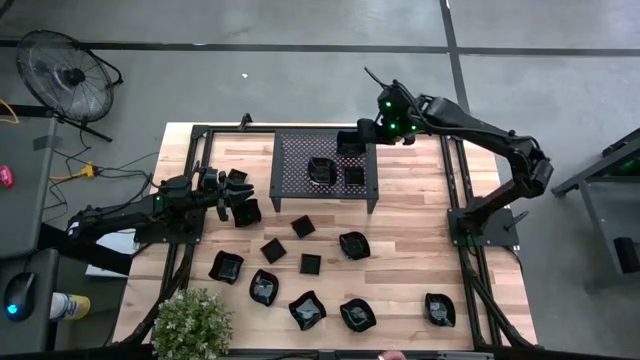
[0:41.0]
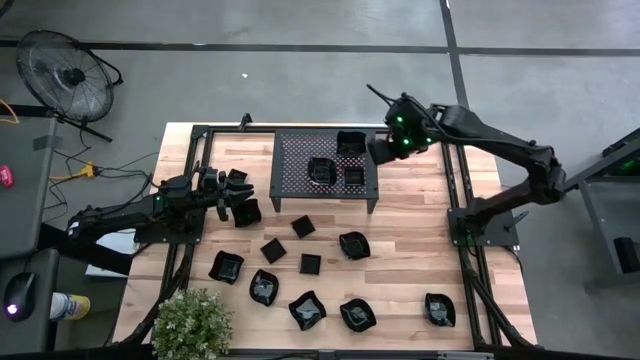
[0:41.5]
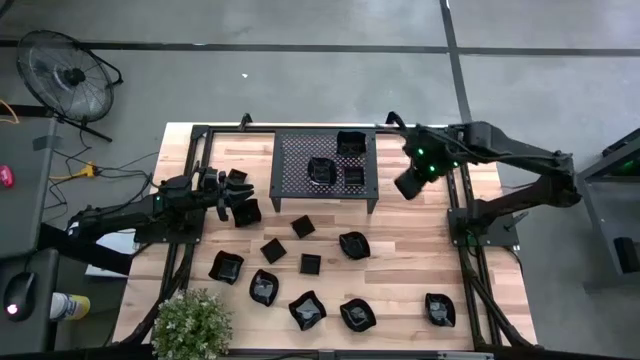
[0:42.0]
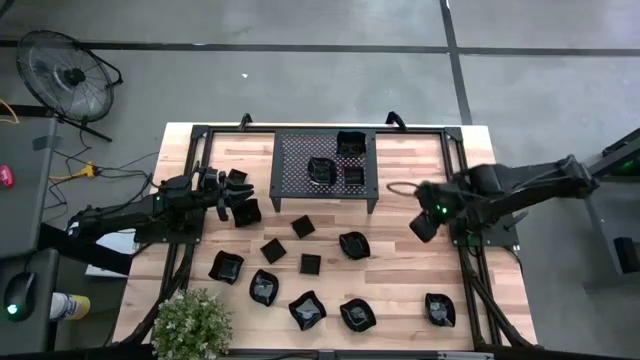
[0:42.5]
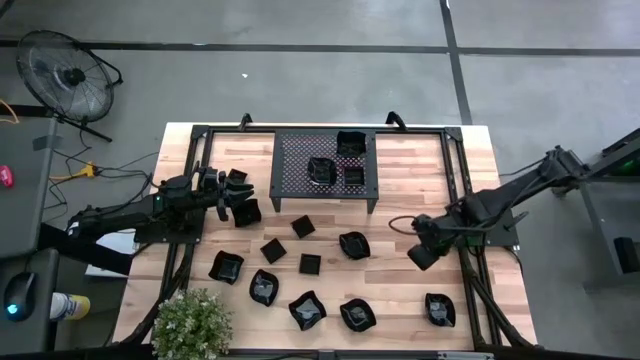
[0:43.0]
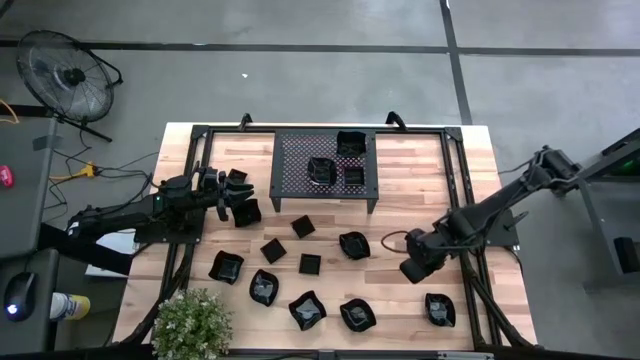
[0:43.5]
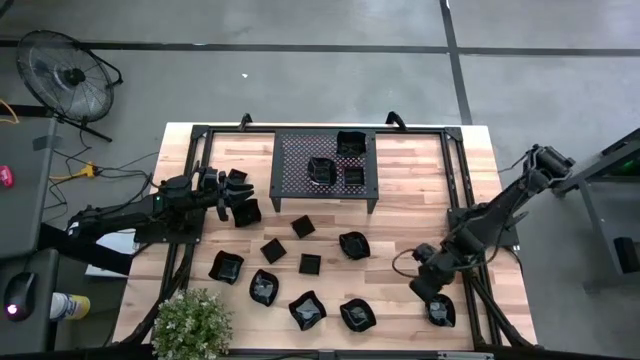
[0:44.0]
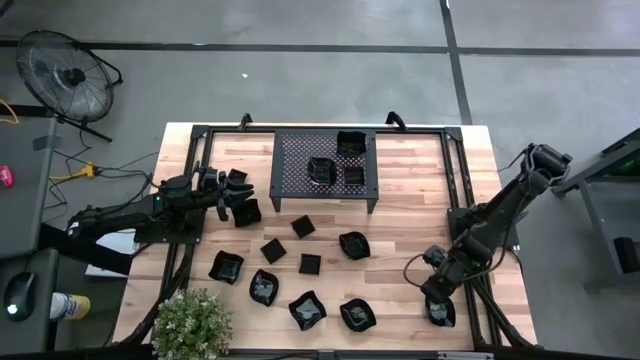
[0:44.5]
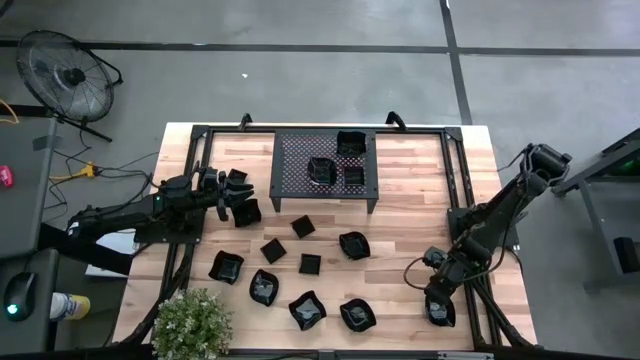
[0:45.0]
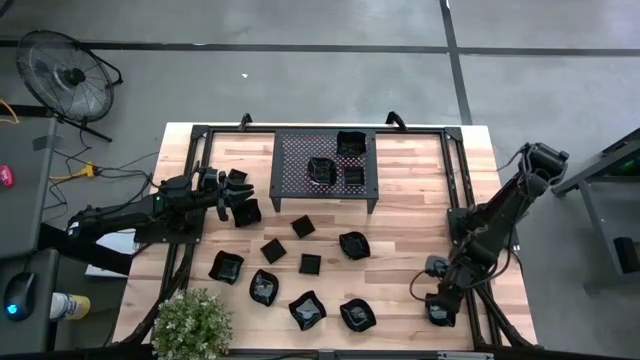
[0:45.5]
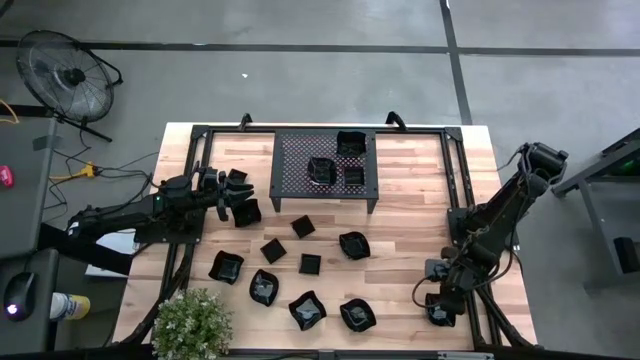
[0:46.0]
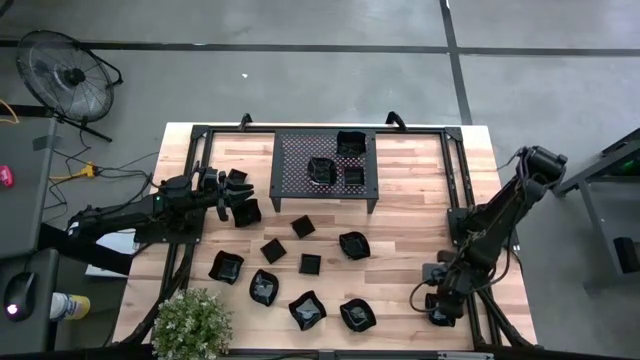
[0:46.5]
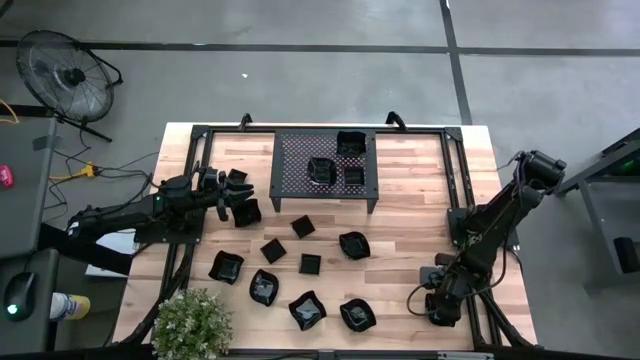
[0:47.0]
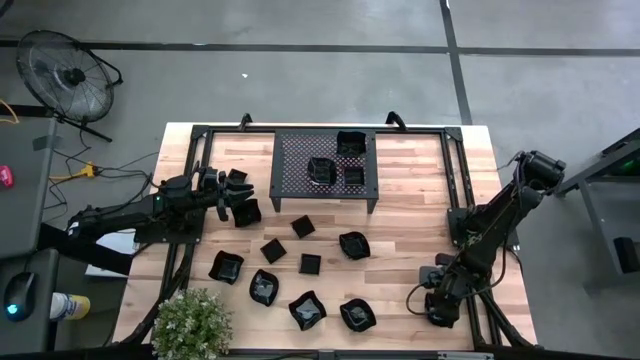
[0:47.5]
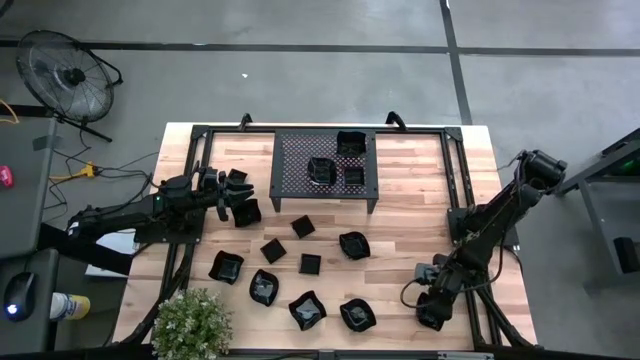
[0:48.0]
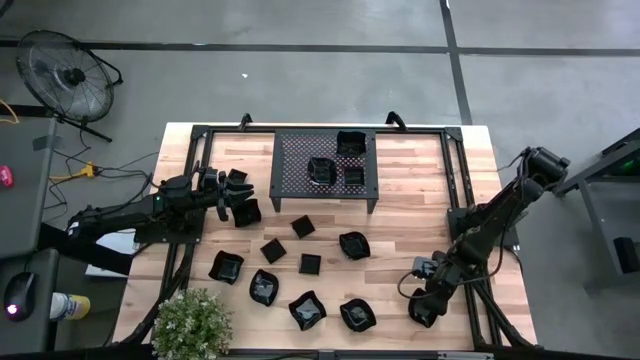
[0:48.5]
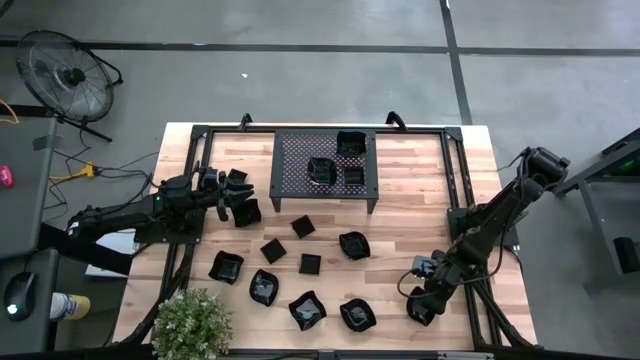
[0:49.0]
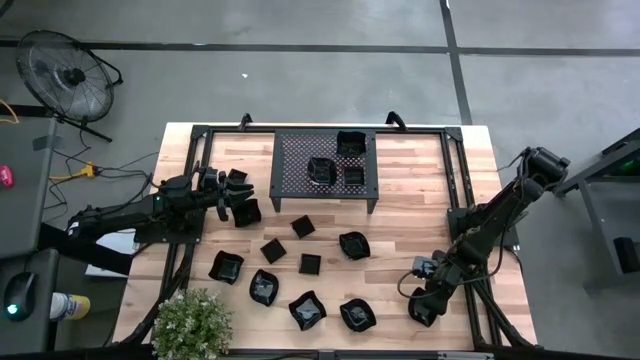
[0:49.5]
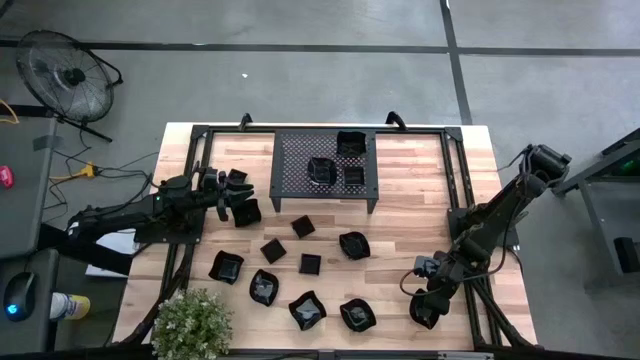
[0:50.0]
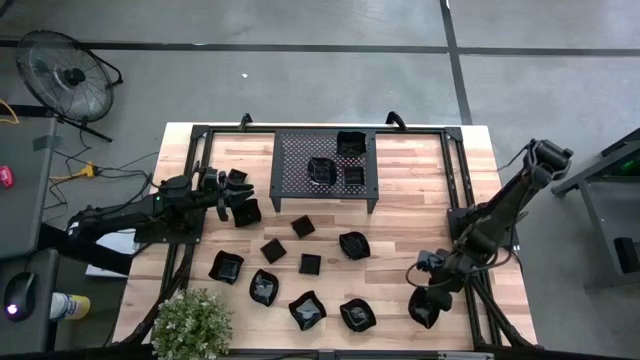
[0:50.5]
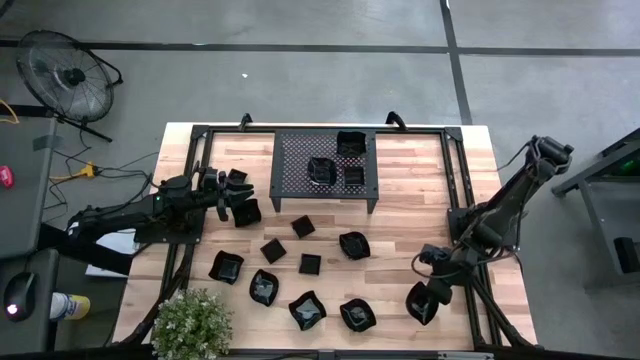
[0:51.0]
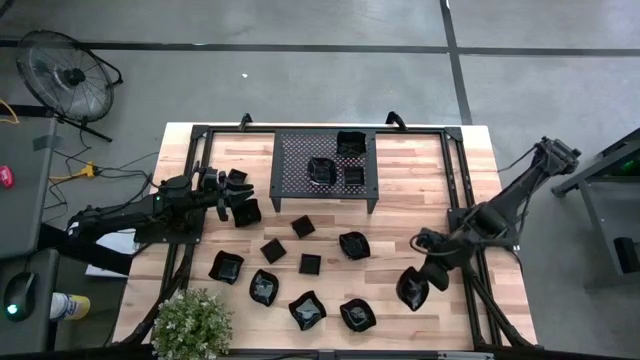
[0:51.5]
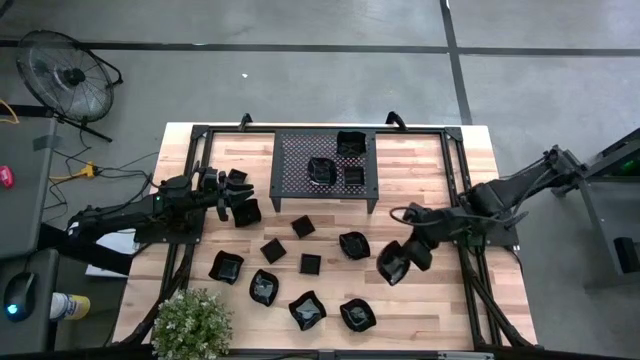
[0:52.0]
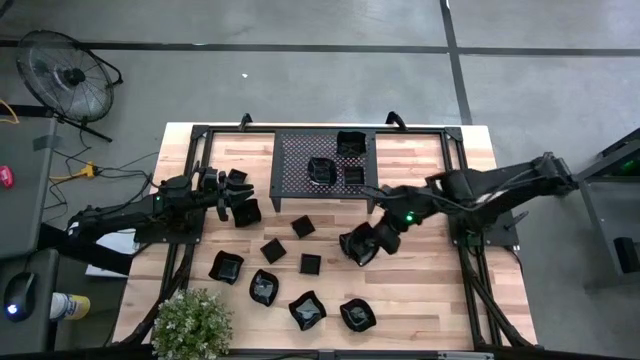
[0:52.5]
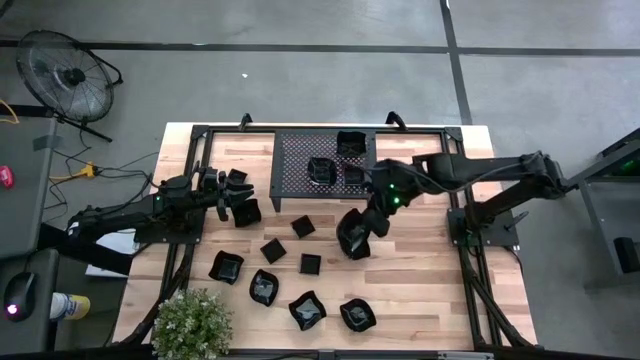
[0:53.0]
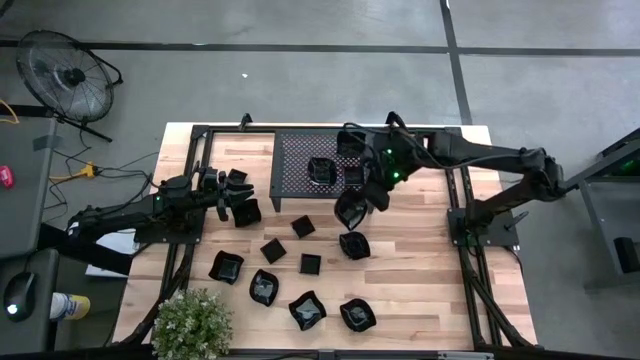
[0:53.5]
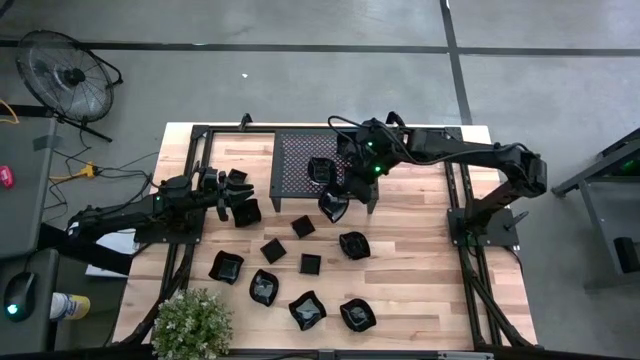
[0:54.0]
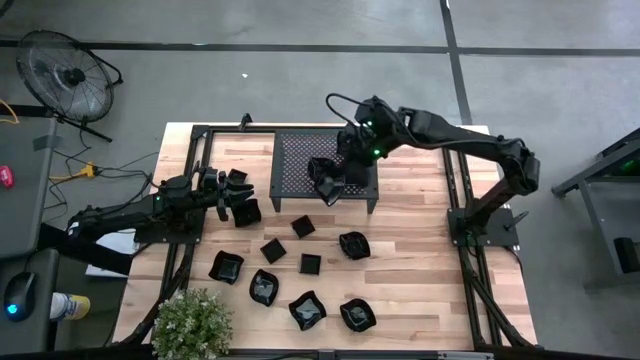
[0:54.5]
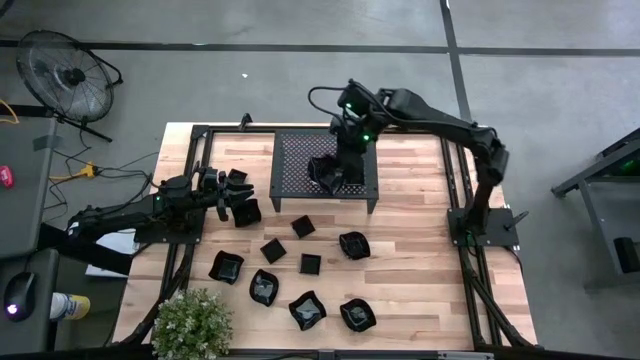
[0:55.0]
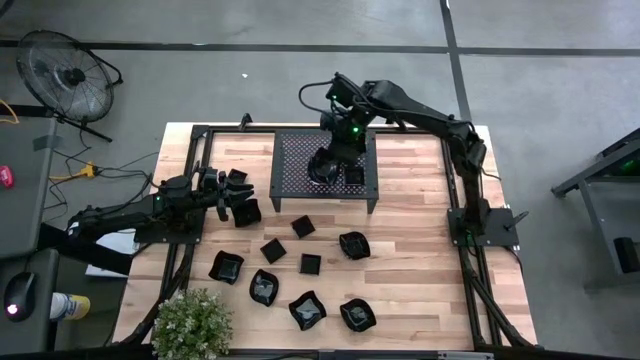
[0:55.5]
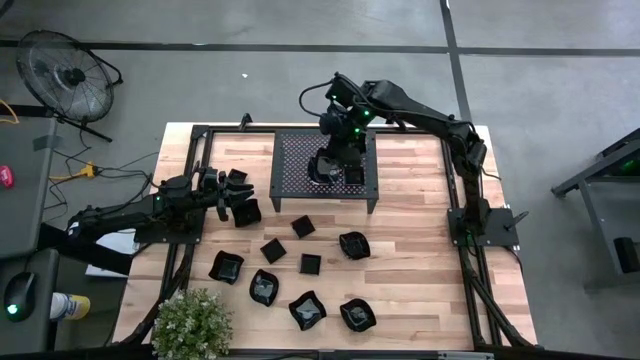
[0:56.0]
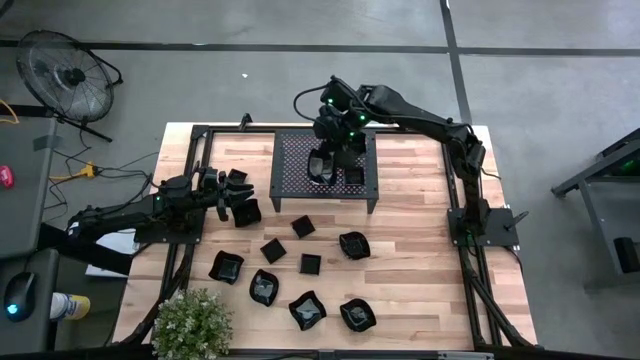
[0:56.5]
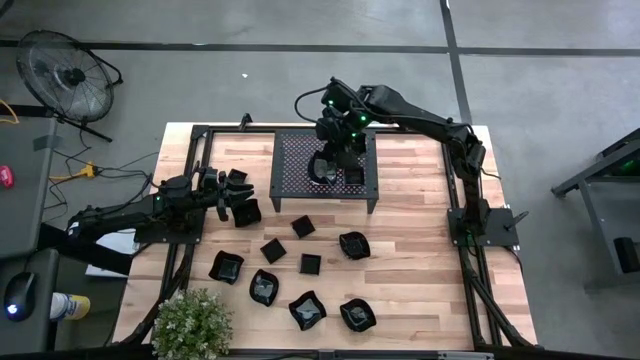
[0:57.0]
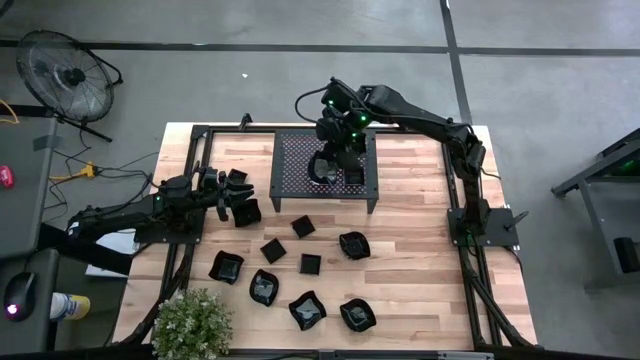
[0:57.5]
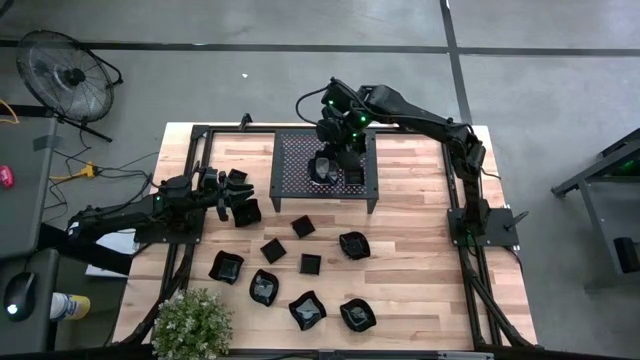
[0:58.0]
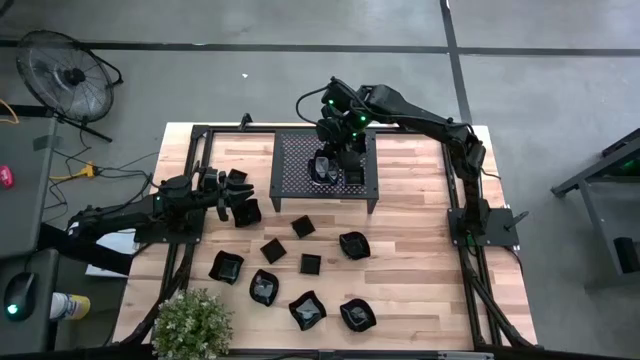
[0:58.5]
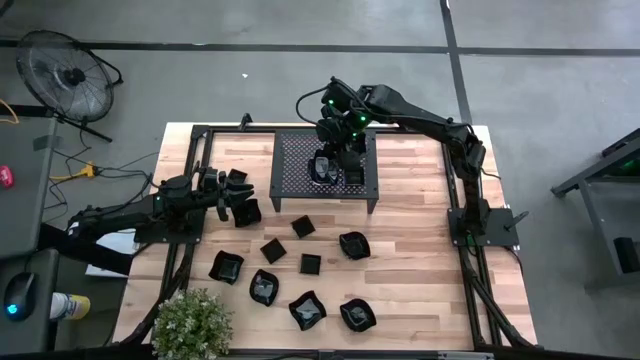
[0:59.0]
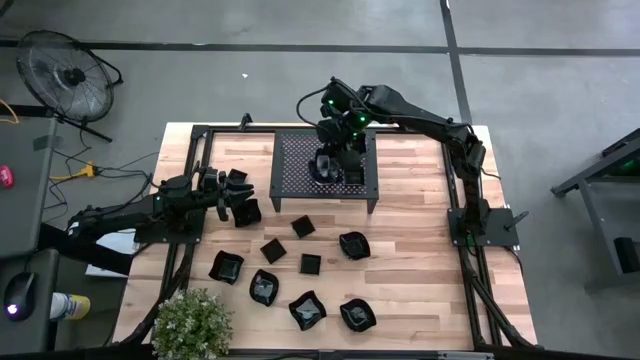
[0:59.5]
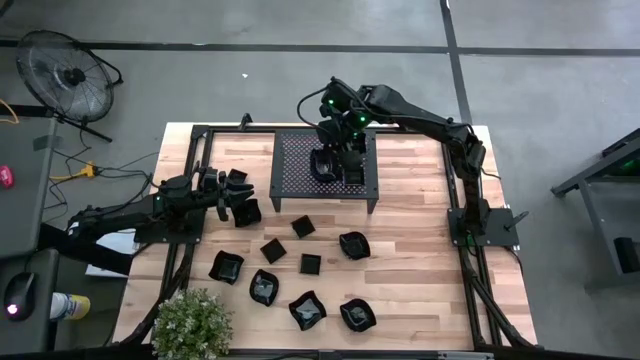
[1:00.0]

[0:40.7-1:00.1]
Task: Pick & Place Mini shaped plates
Stack the black leaf-shaped plate on top of the other black leaf-shaped plate on the shelf

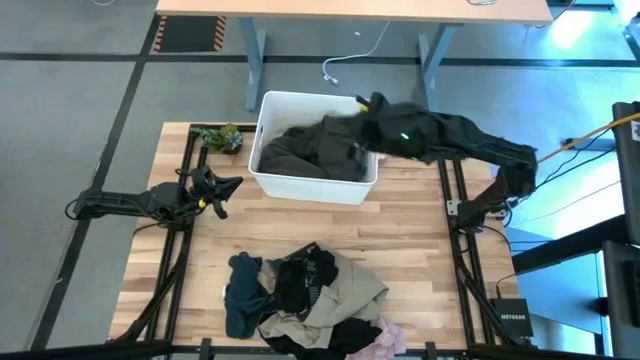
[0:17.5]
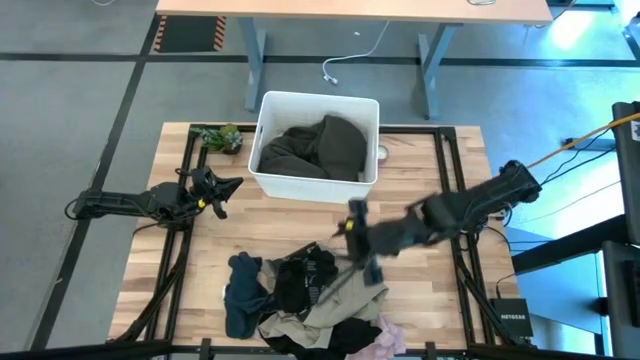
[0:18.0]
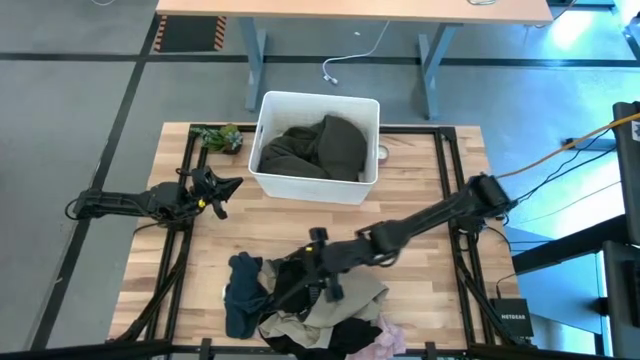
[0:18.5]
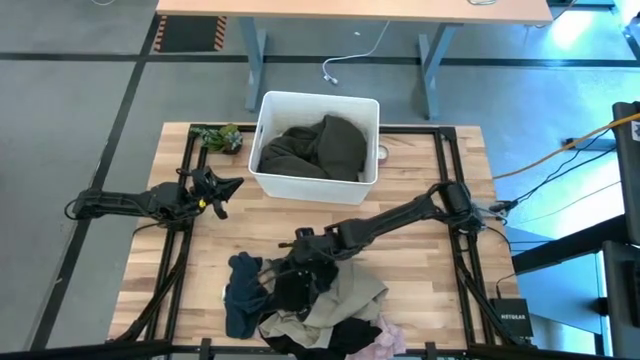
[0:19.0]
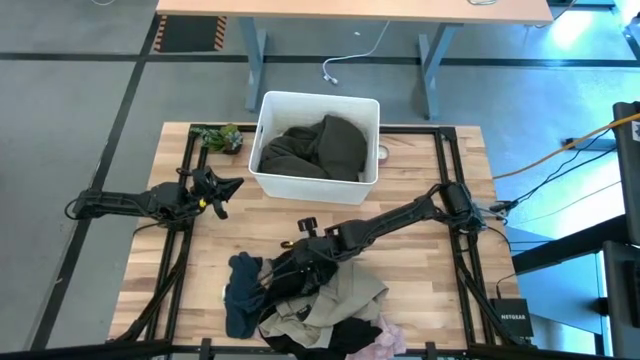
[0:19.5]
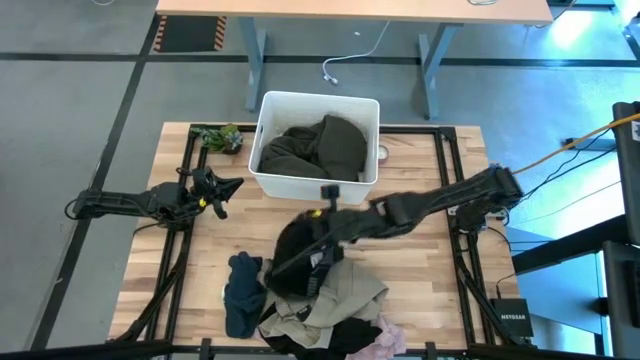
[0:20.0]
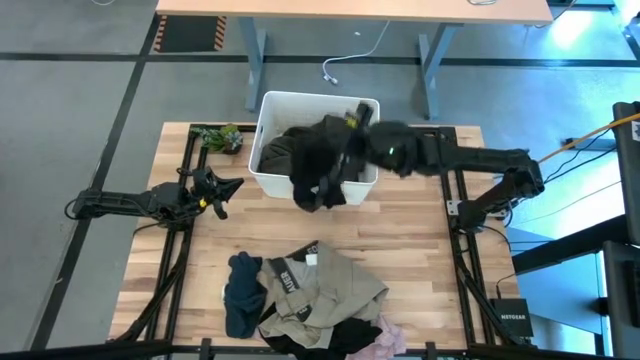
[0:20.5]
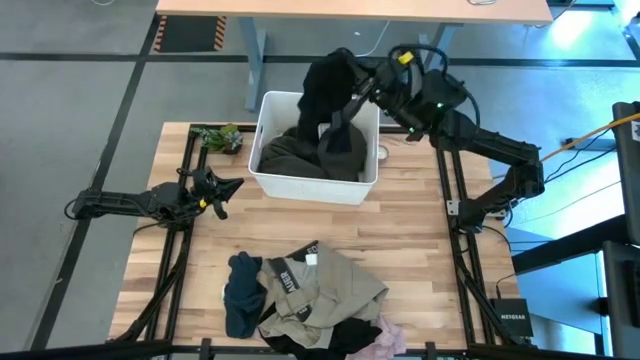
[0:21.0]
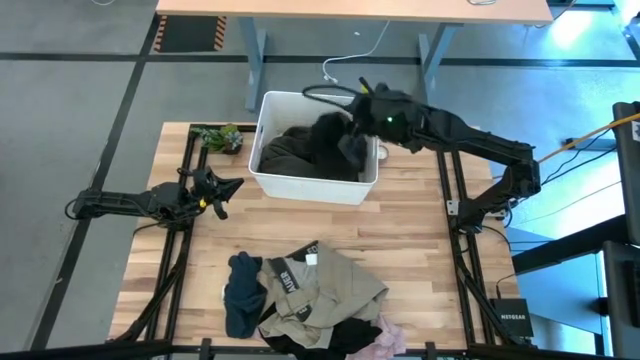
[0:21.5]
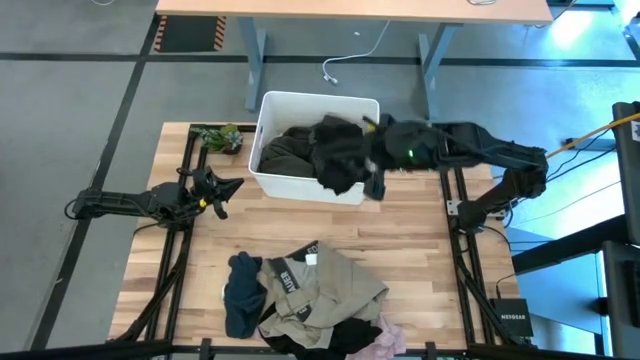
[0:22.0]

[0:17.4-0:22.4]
Task: Sort clothes
Put the black underwear into the white bin
